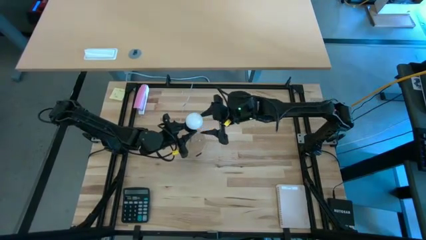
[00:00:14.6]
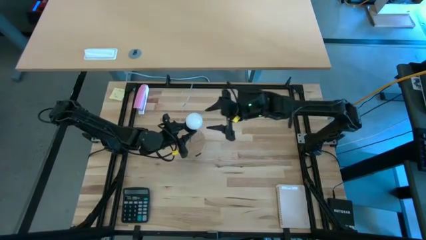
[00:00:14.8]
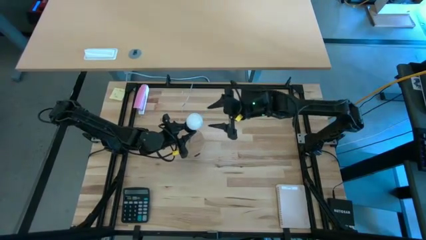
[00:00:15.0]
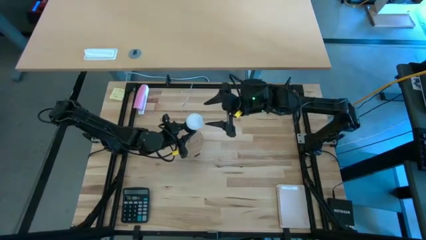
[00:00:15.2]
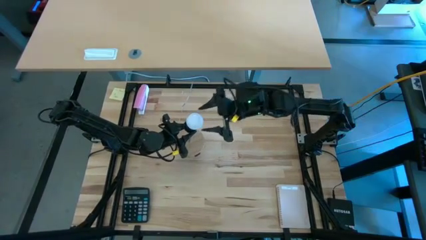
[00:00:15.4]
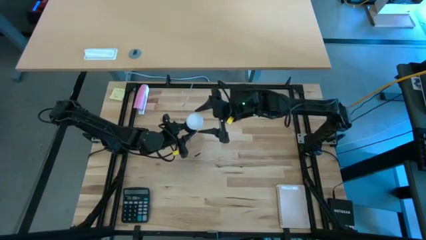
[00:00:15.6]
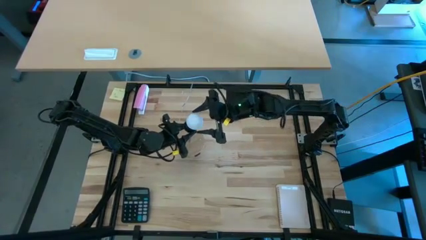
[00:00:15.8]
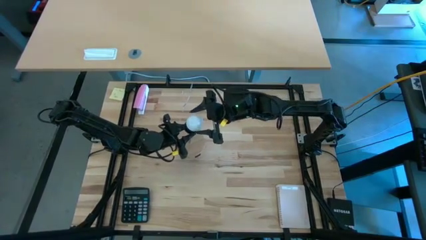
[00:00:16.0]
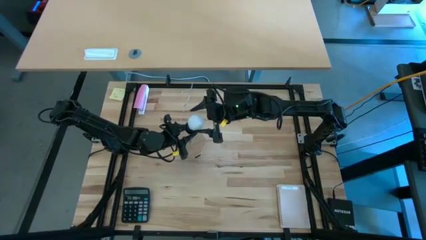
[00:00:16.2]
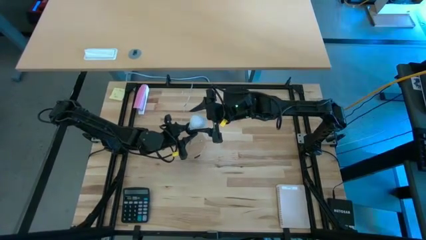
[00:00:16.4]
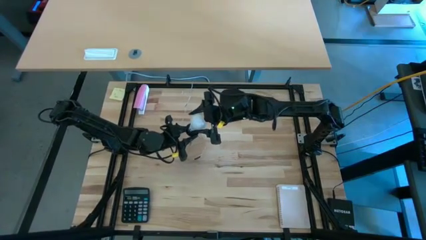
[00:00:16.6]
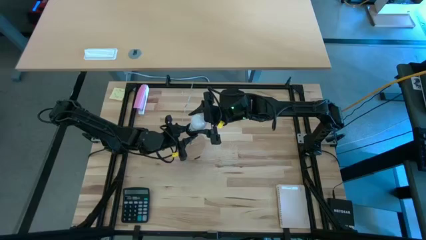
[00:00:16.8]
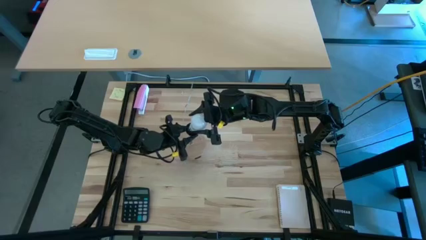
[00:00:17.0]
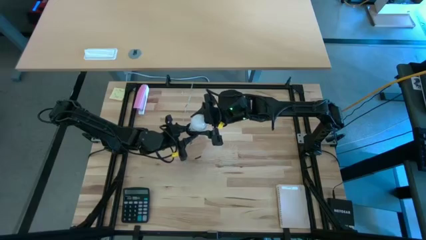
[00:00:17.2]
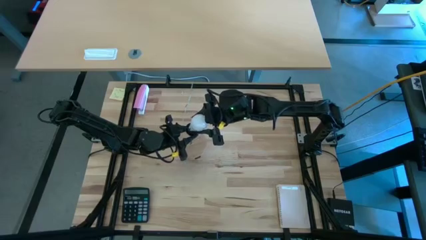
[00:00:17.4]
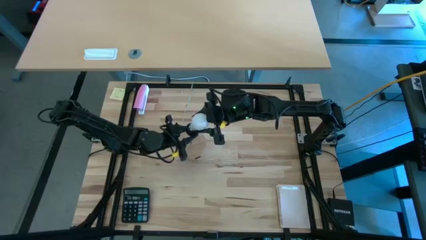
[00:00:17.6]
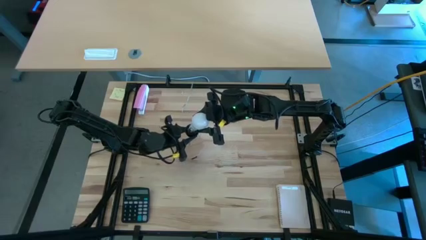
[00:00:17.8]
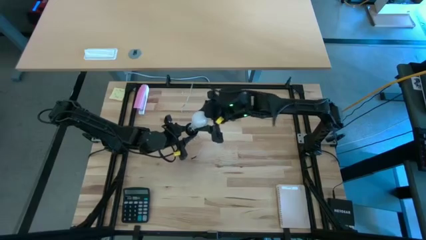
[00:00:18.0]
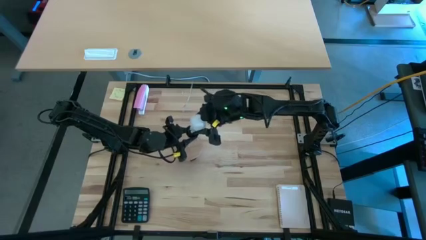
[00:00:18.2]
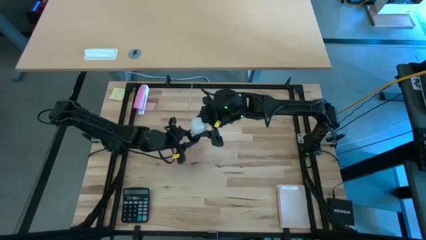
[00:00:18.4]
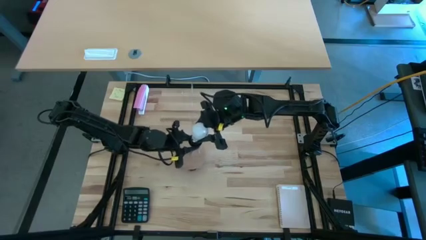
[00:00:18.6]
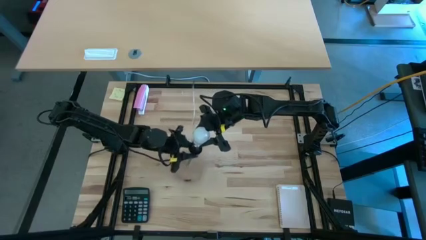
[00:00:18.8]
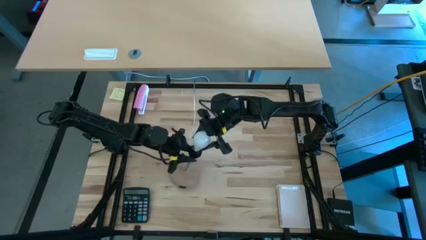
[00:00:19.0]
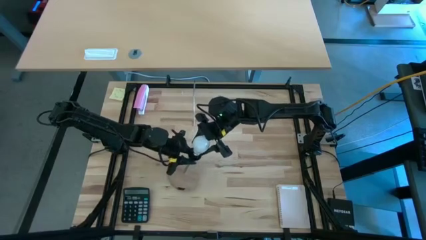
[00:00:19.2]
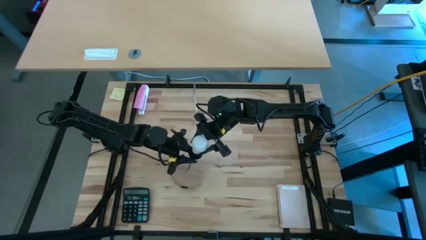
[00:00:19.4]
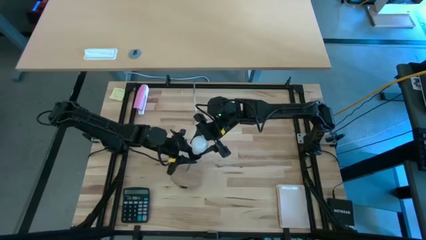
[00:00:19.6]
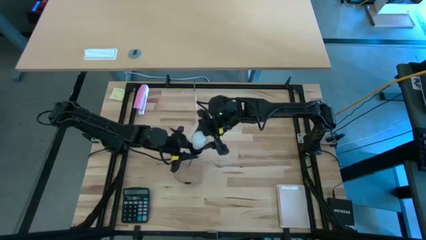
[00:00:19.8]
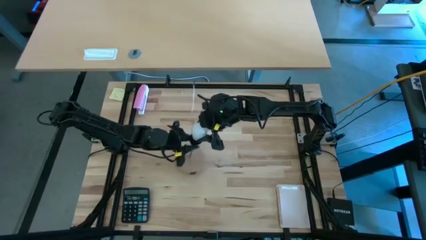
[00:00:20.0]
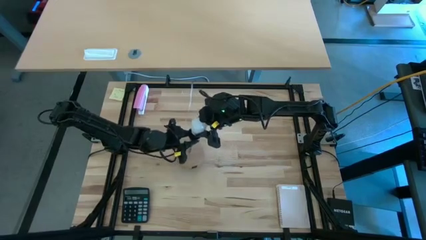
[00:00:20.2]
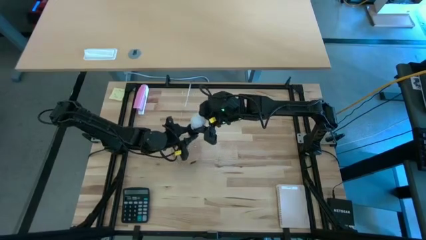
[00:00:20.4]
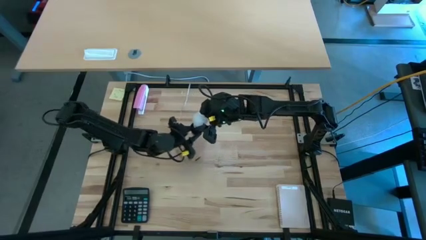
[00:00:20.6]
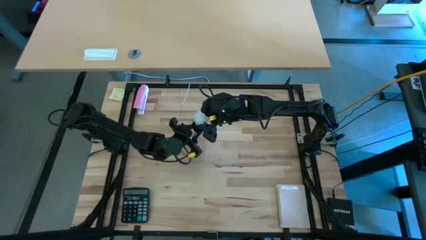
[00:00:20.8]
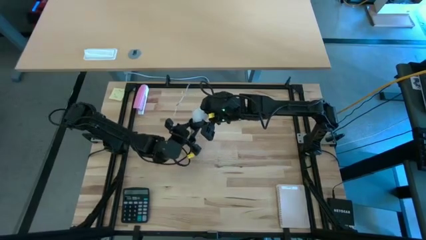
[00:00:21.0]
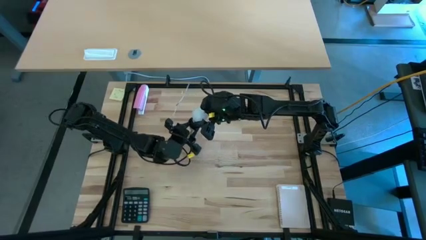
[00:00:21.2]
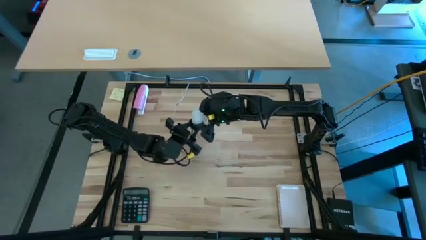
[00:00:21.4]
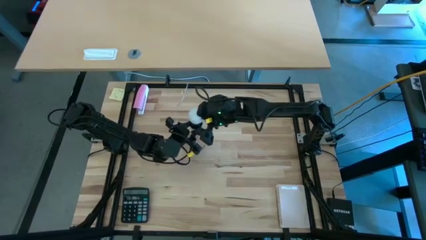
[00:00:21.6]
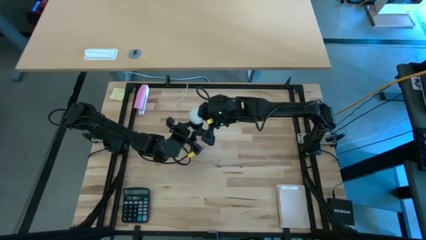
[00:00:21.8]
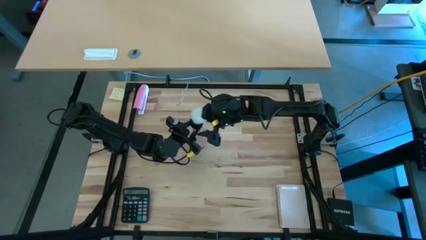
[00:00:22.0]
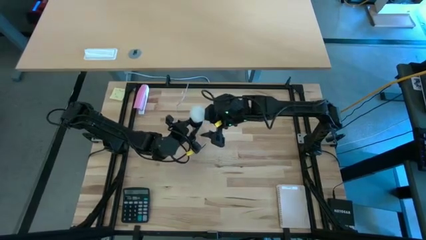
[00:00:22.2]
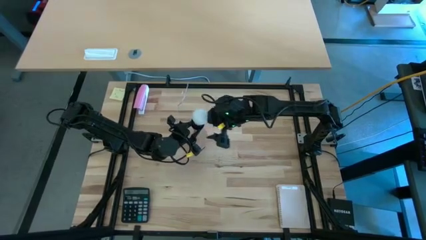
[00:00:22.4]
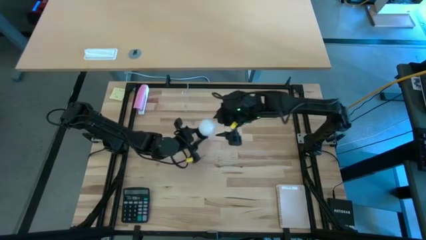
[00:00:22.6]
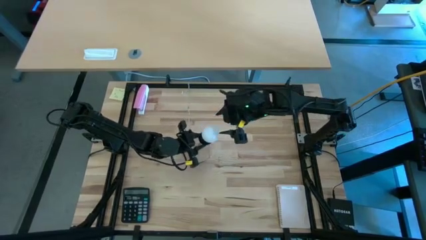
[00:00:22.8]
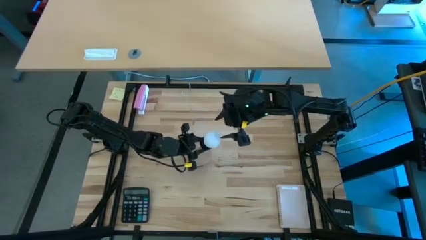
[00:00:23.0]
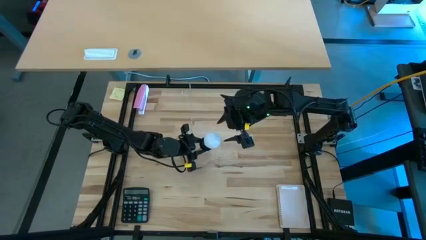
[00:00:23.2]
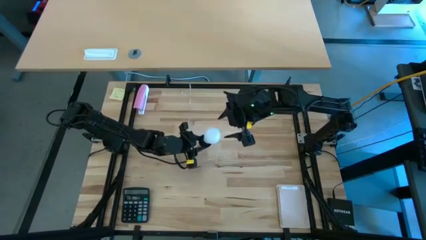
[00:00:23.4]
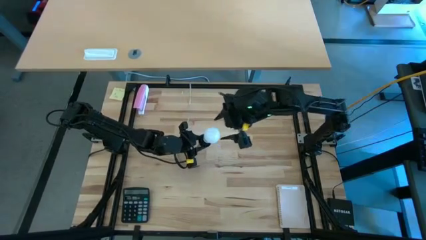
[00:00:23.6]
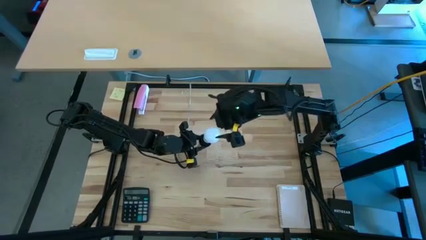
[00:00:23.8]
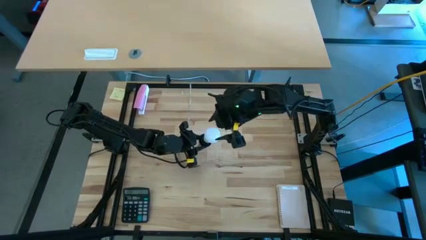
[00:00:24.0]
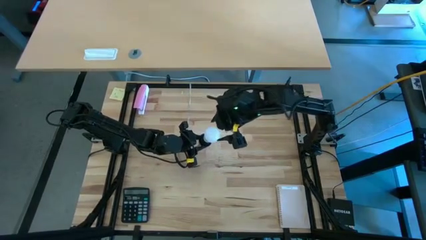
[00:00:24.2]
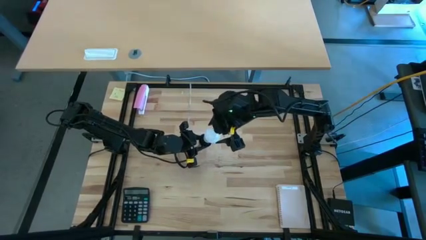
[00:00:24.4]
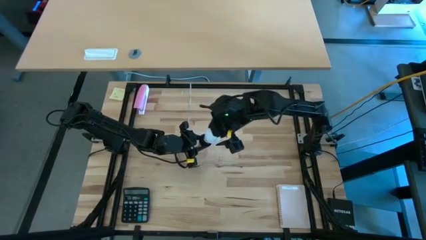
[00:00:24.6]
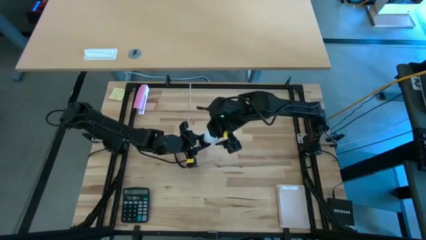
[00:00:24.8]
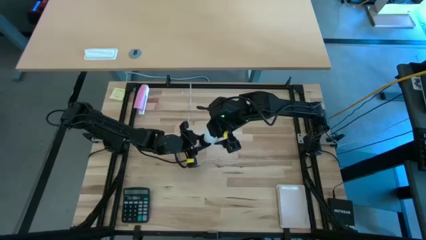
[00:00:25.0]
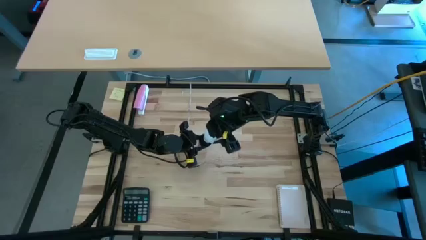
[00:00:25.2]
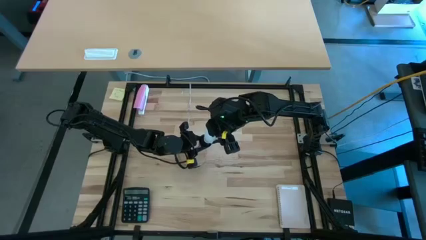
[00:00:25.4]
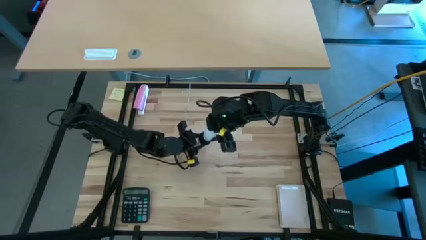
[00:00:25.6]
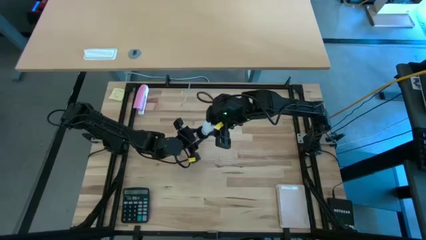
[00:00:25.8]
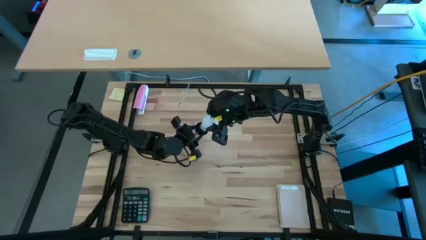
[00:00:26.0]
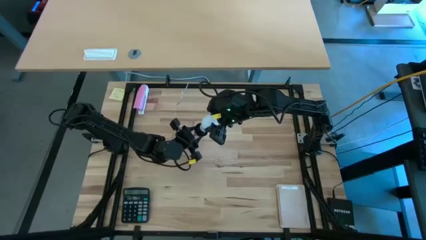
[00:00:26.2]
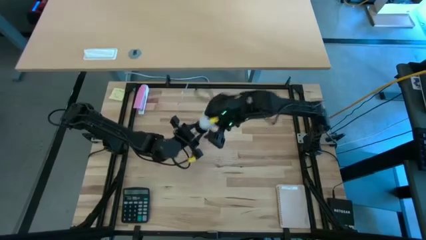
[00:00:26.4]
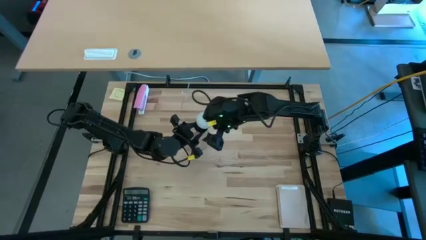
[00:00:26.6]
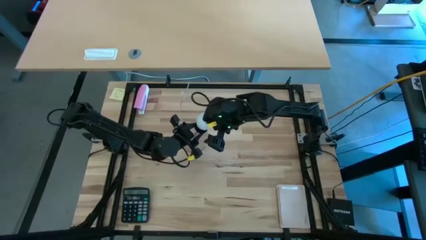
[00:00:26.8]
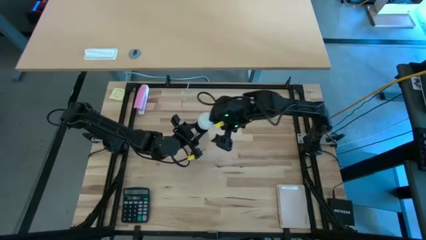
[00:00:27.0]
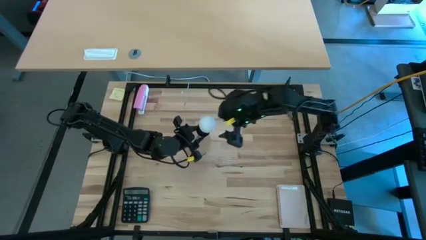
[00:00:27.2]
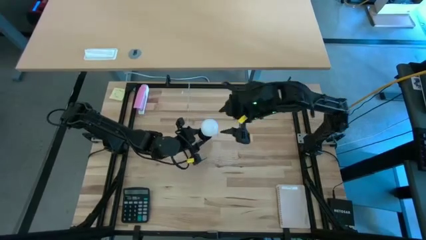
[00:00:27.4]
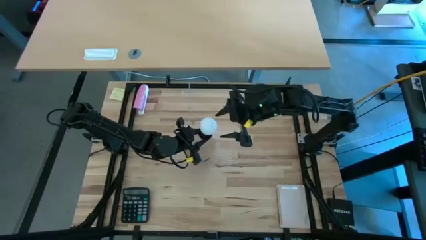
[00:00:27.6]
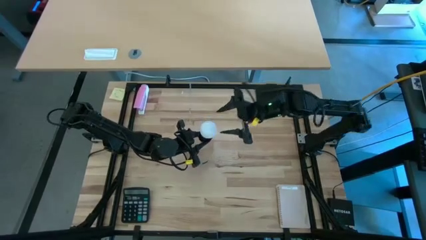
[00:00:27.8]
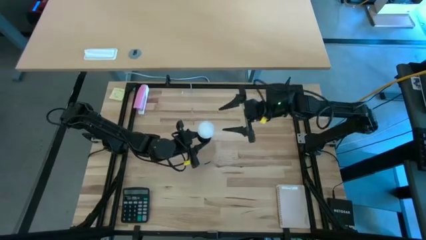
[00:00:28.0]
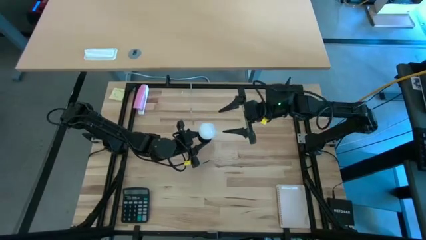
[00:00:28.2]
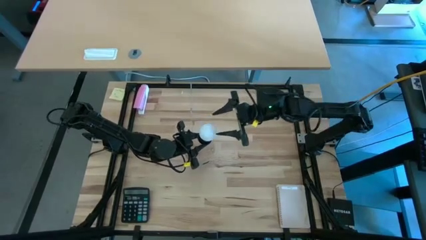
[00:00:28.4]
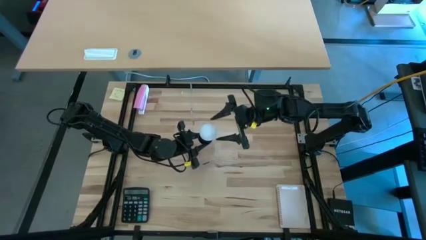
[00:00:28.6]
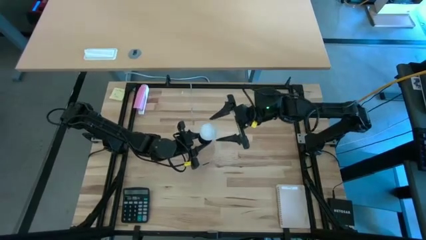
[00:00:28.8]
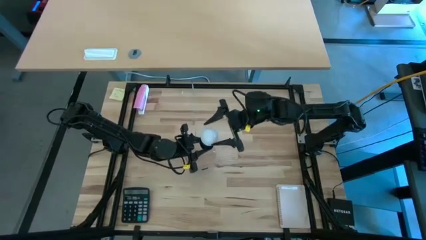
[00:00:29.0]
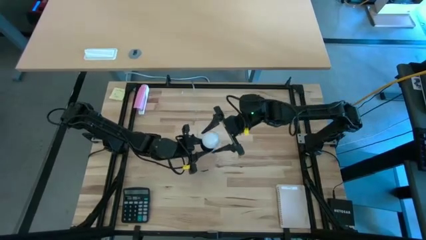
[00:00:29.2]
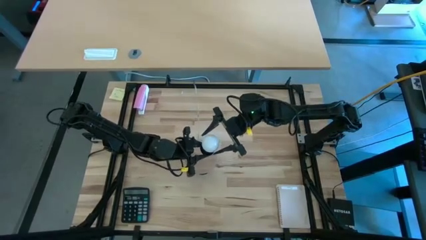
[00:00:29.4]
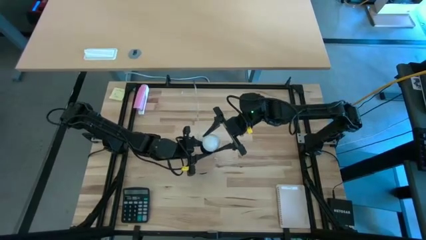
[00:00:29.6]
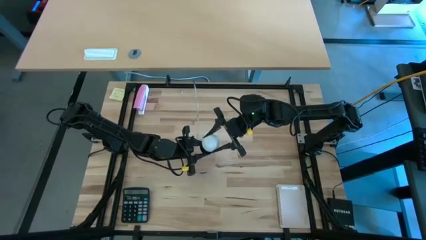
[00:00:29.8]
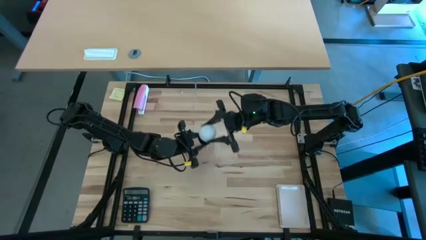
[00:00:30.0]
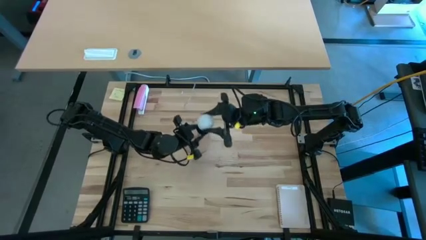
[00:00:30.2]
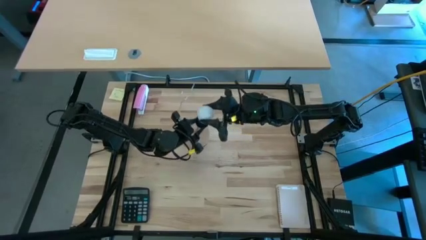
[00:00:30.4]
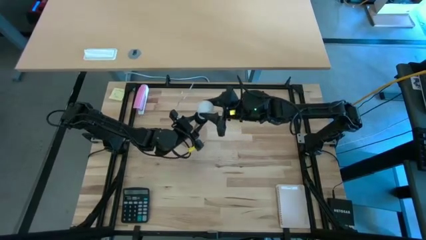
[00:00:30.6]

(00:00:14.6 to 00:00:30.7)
Task: Screw lightbulb
Insert the lightbulb into the lamp
